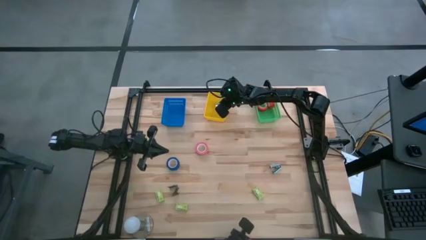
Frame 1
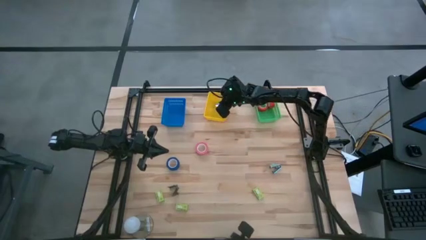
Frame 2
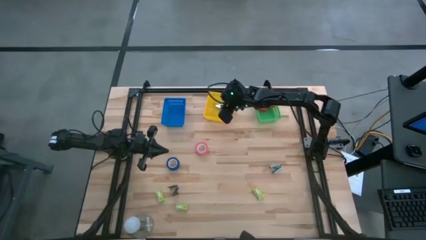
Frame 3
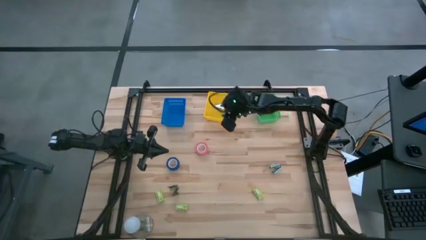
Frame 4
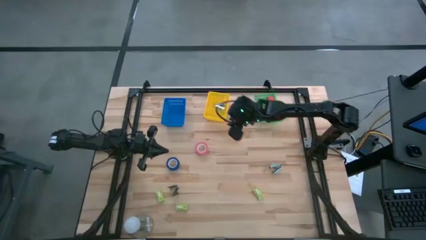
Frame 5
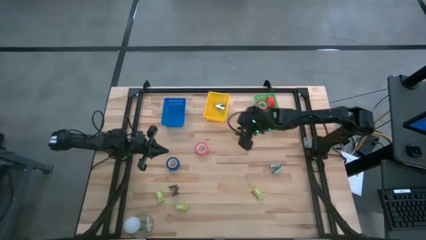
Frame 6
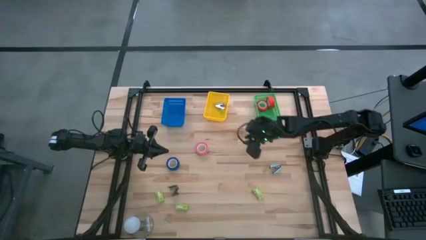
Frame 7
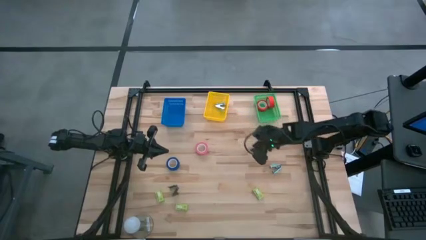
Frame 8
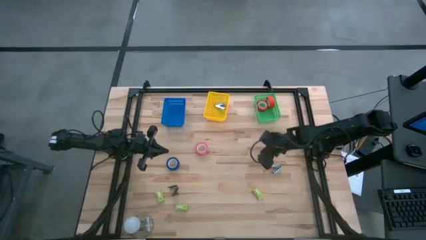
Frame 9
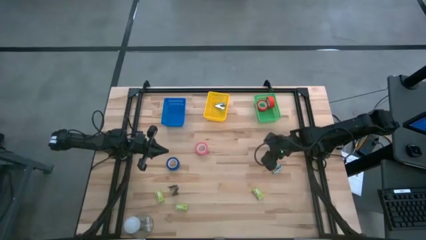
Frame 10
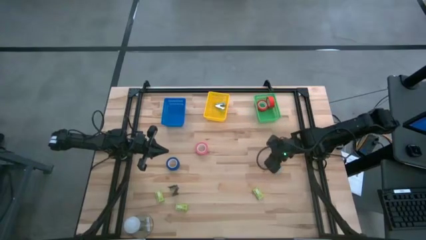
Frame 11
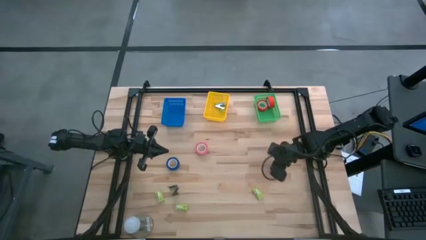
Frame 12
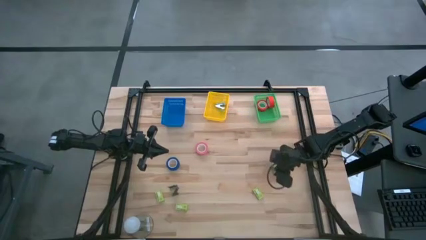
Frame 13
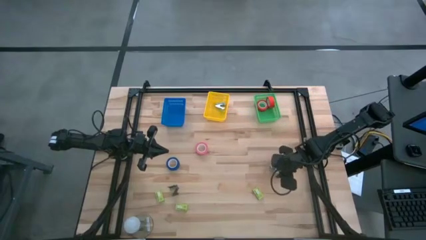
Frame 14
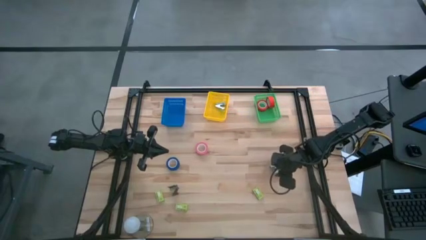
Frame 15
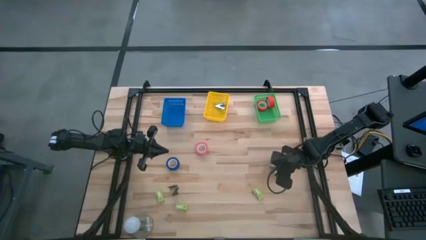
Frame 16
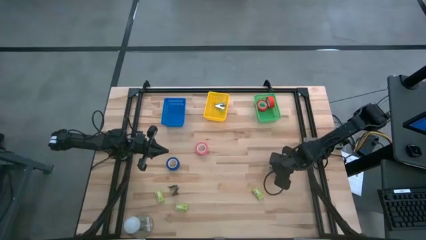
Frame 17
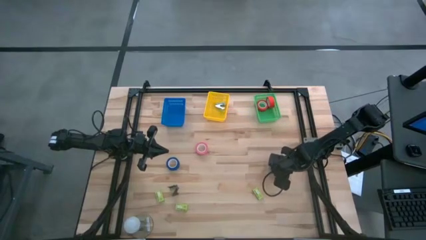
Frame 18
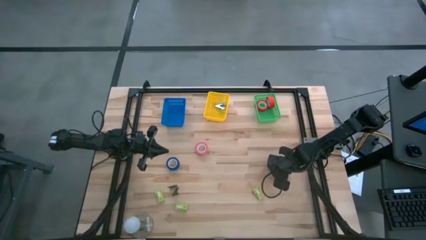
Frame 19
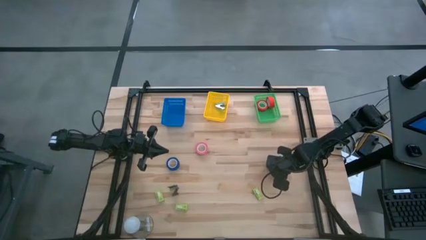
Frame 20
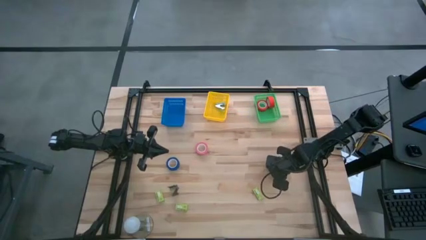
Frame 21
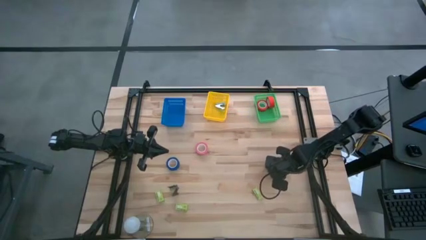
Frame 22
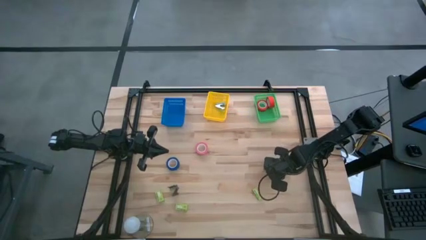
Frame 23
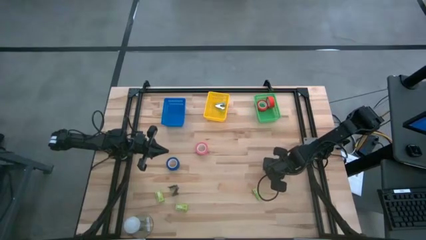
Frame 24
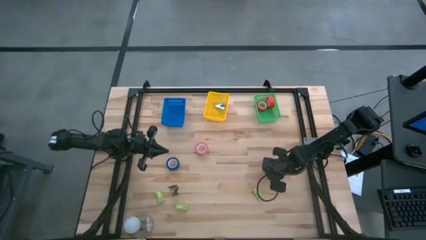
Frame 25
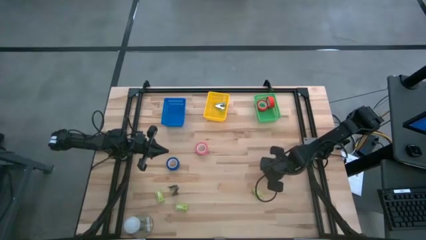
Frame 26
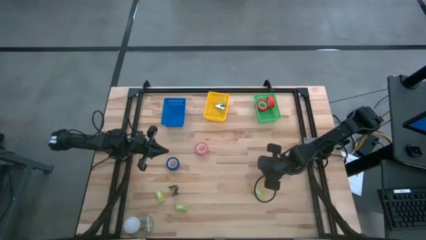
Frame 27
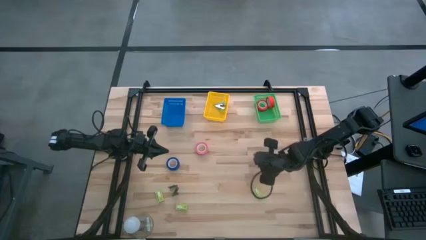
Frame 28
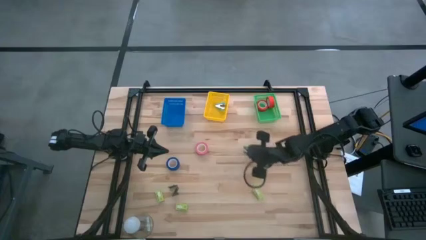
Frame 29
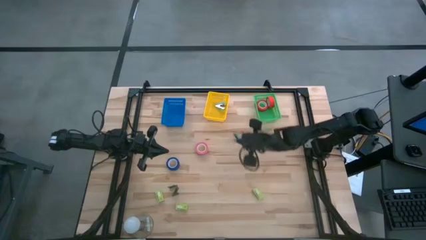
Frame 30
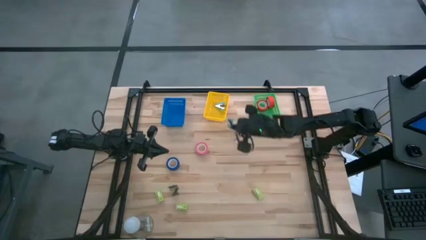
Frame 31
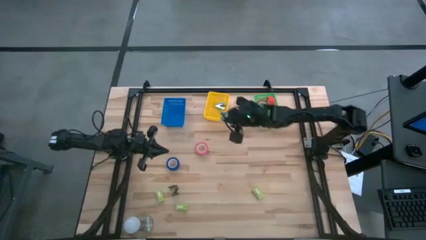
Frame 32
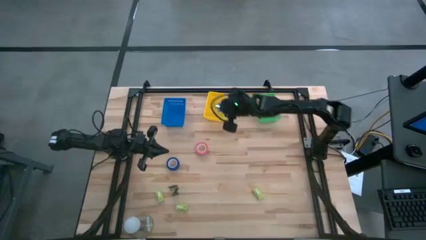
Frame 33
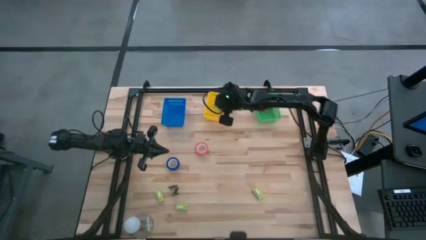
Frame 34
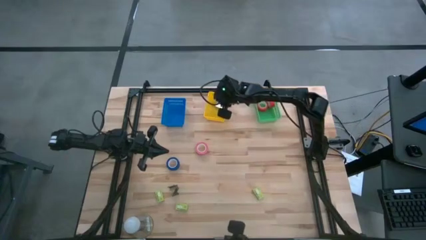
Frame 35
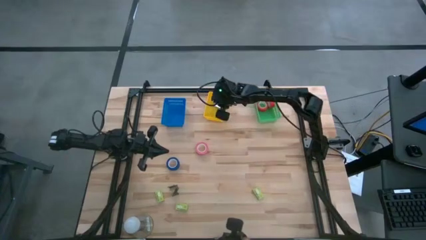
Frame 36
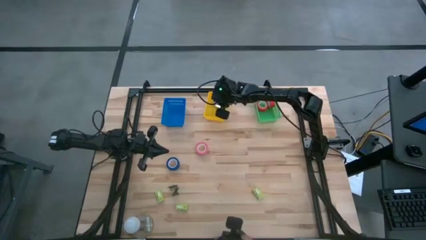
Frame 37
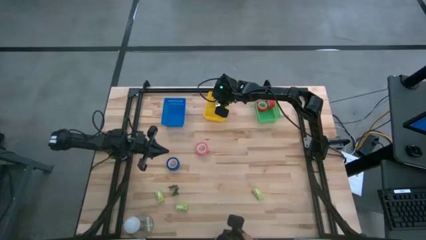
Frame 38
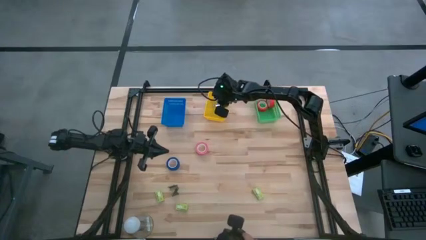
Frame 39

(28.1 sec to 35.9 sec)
Task: Pick and place Stapler, Stapler remover, tape
Put the light blue staple remover into the yellow bin

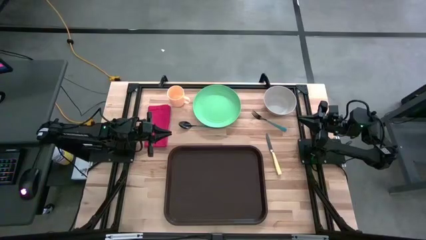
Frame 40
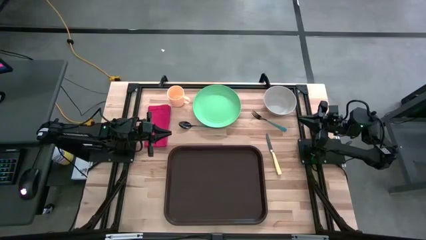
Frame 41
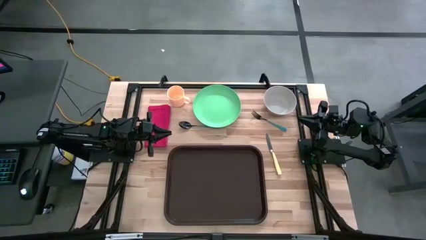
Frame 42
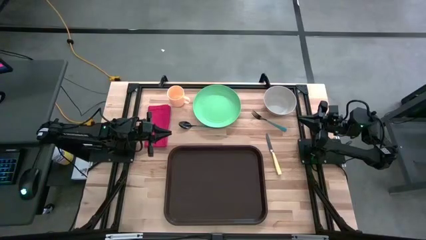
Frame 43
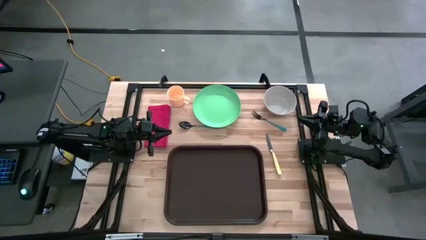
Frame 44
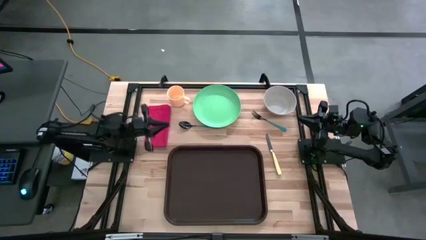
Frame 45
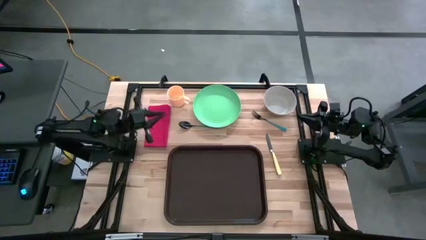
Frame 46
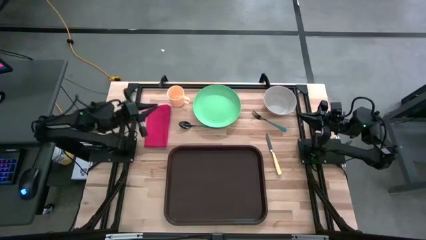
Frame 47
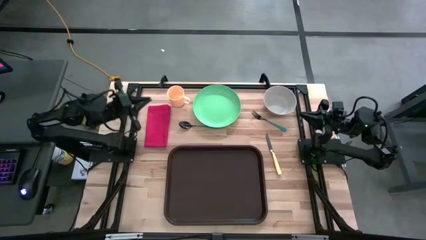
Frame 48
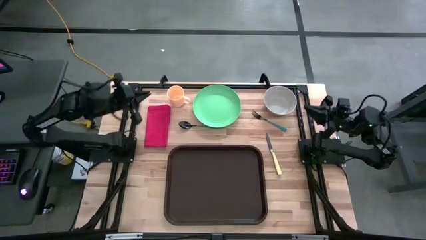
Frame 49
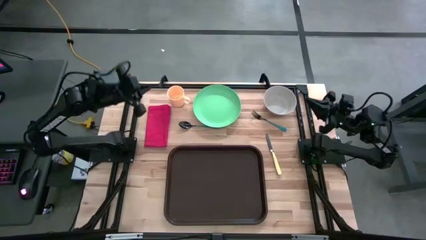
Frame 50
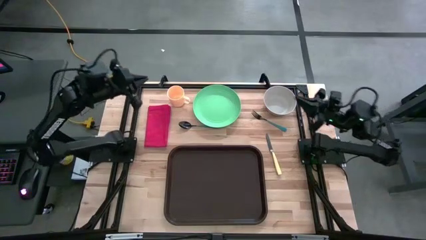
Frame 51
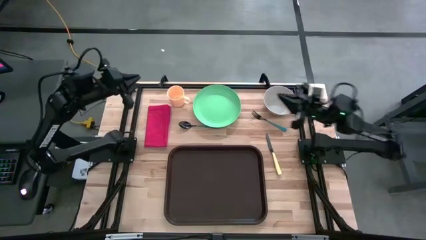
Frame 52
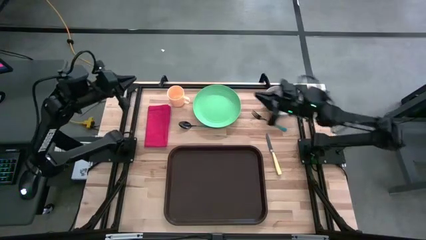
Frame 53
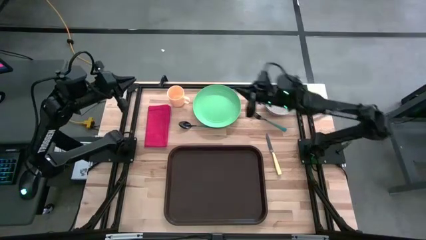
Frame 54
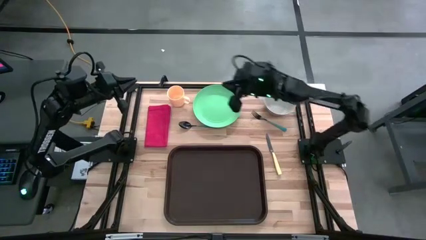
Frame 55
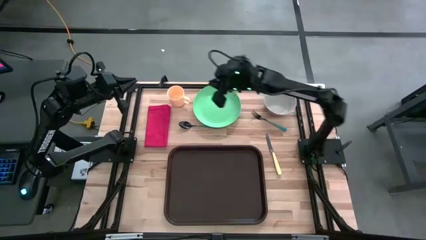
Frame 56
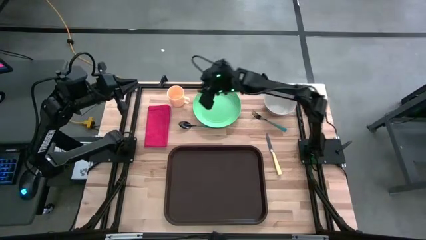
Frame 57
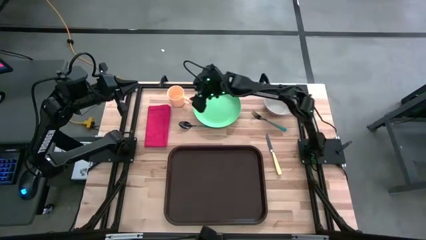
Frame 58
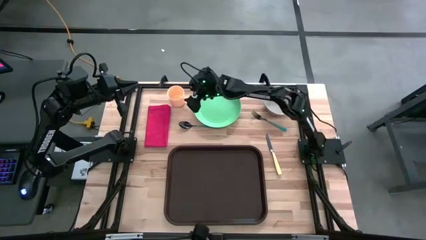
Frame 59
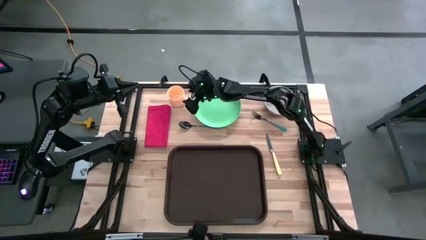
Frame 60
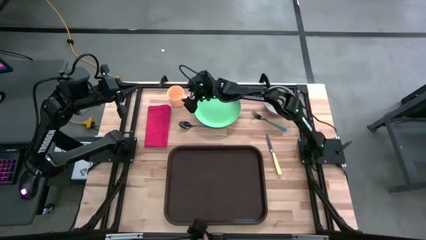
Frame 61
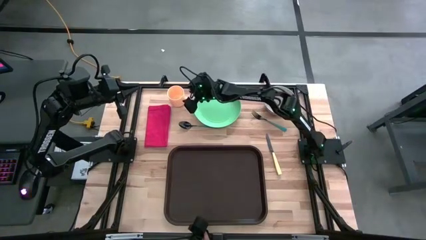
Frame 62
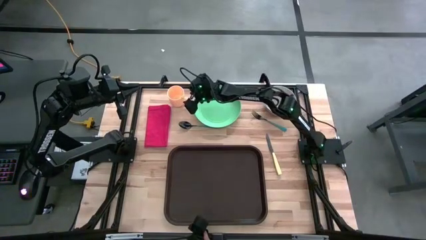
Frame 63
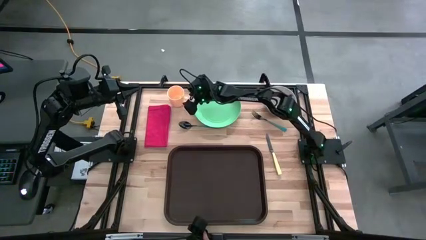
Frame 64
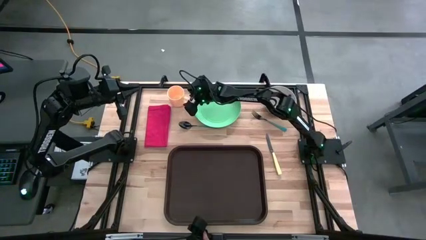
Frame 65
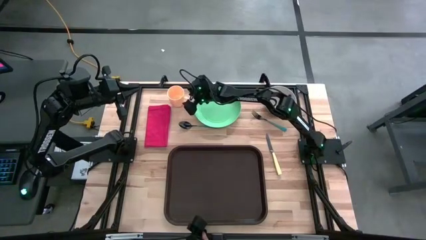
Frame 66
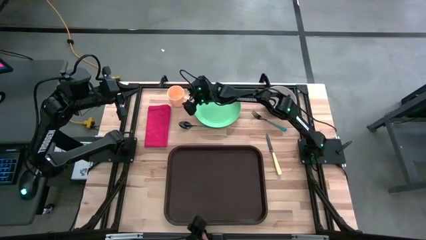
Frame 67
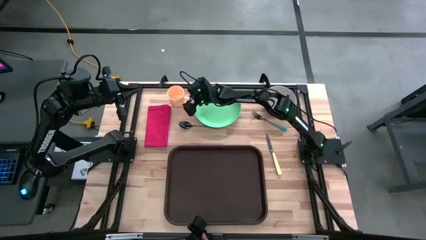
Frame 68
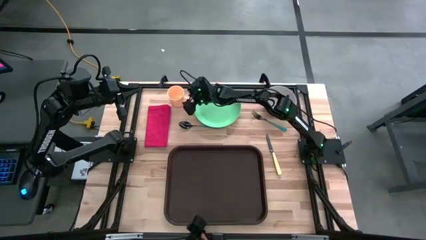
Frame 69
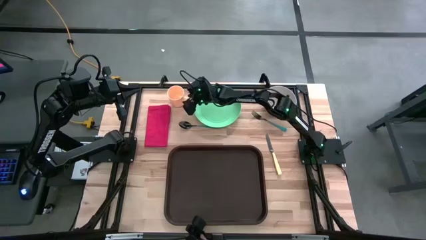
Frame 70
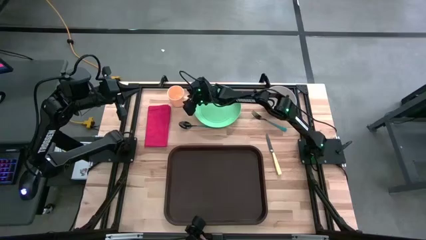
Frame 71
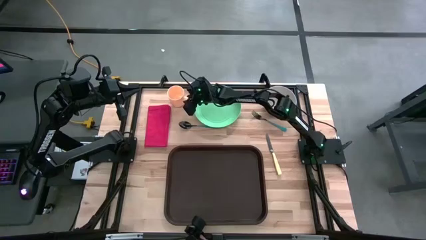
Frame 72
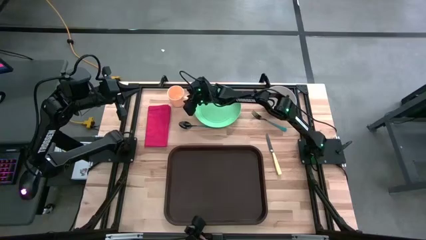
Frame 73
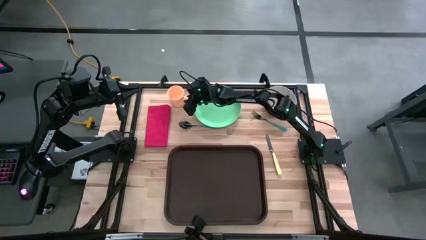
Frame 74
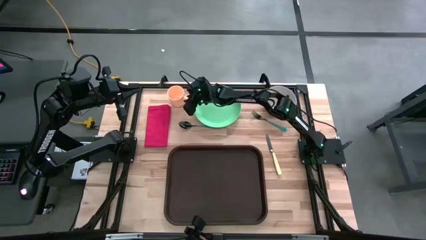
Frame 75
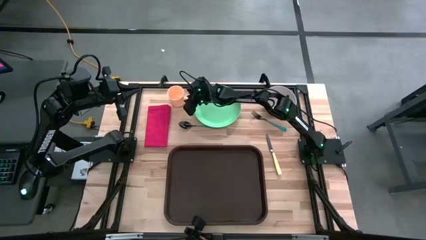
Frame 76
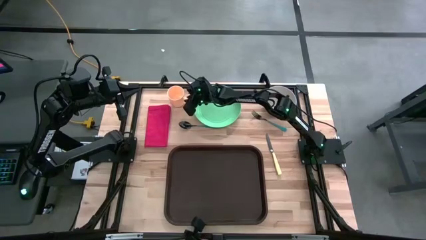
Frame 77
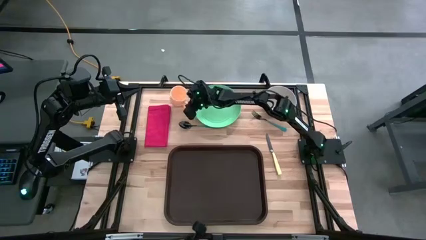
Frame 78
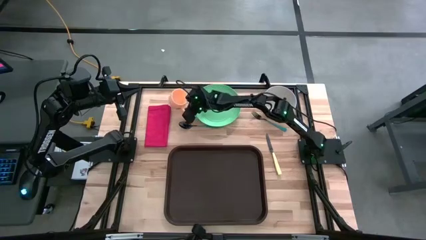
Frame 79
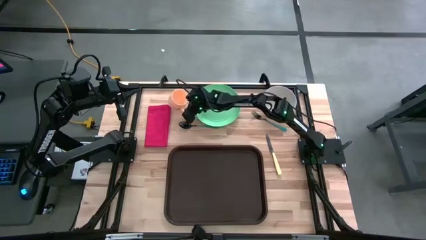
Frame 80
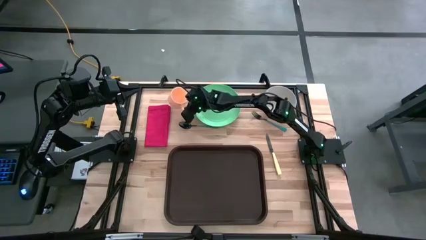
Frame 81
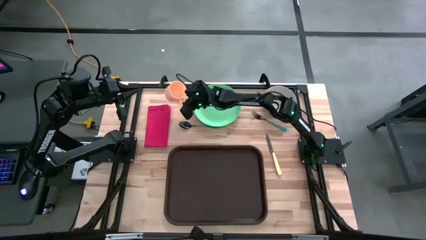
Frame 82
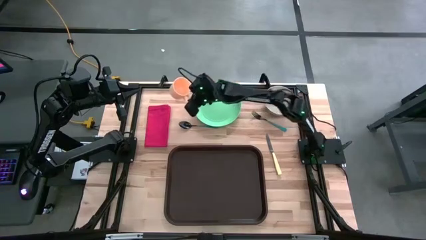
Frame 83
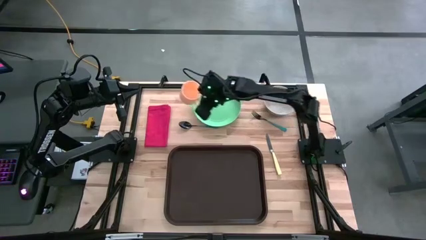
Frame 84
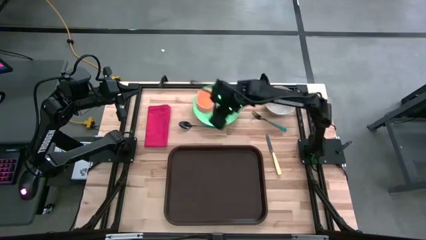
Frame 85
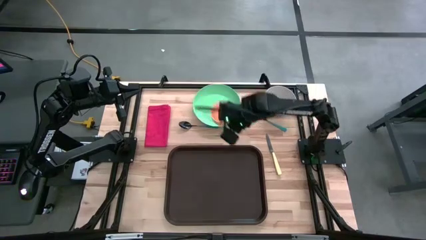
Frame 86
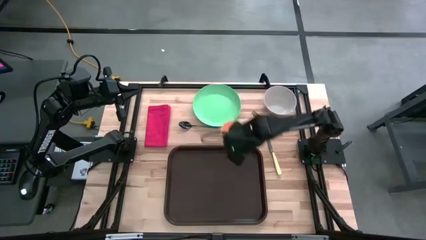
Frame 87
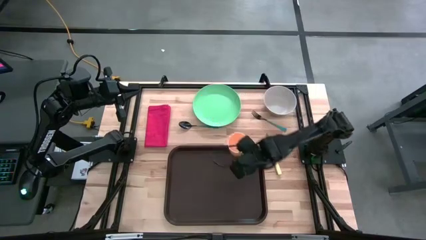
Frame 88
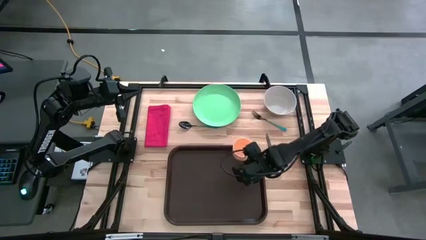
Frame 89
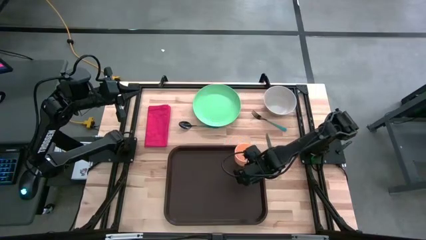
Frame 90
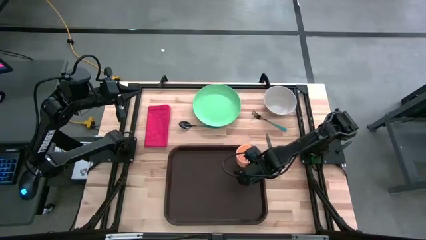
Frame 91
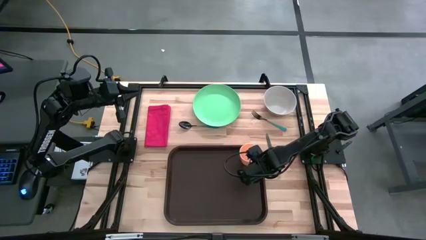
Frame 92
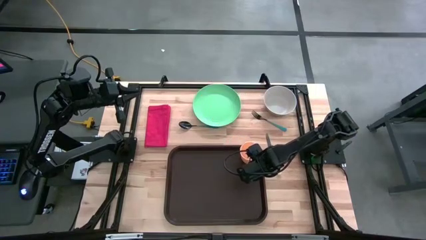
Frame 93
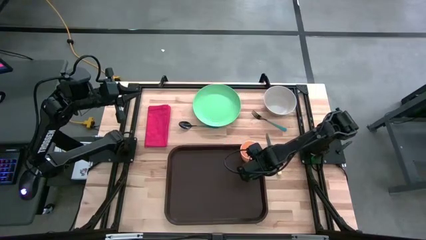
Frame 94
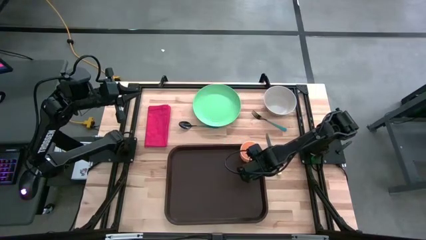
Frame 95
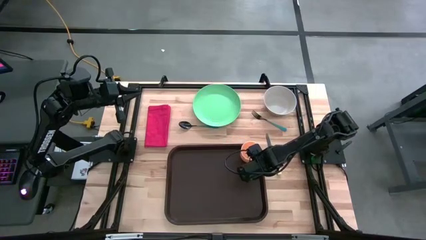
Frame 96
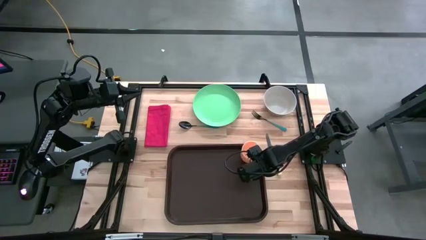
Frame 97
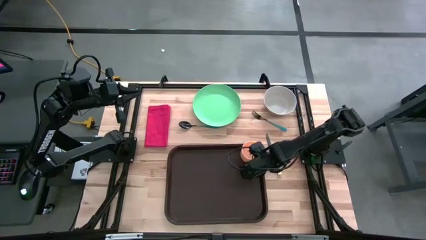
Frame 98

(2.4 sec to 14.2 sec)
Task: Set up tray
Put the orange mug on the brown serving tray
